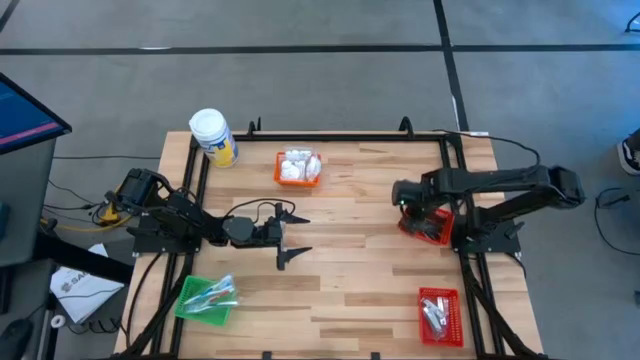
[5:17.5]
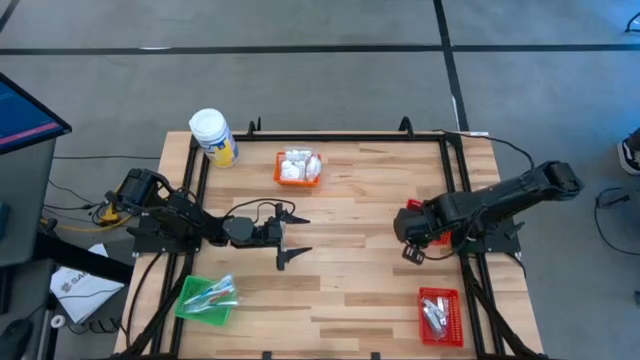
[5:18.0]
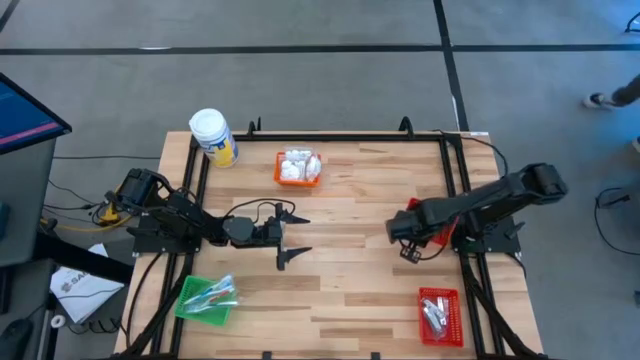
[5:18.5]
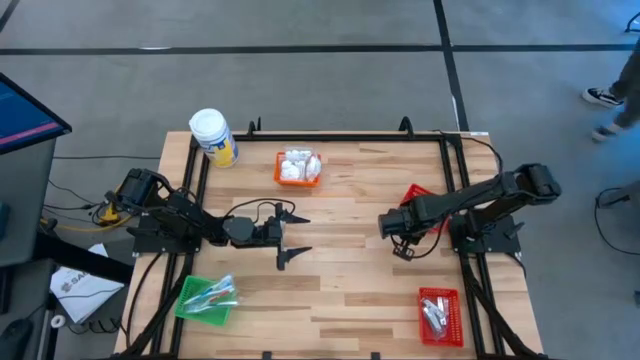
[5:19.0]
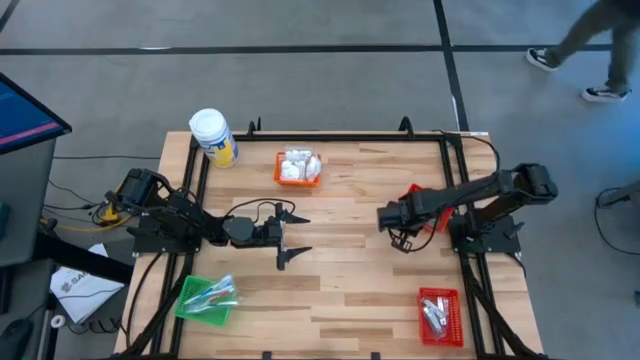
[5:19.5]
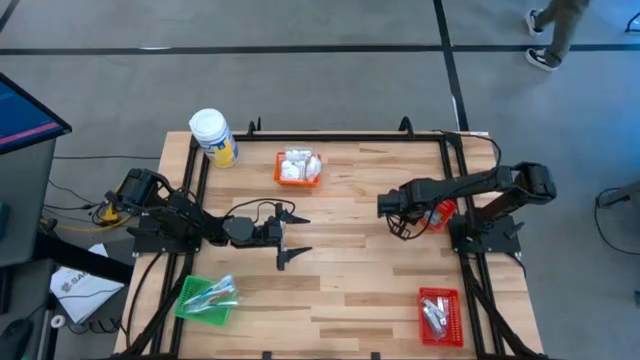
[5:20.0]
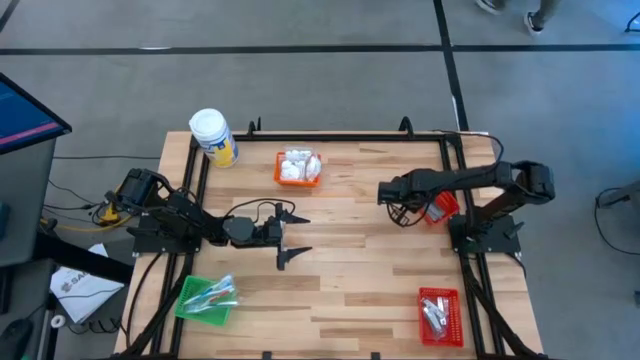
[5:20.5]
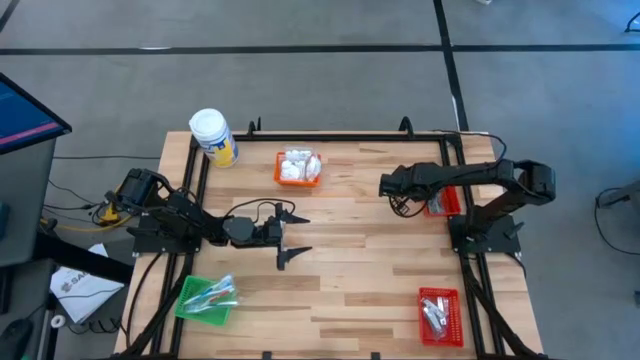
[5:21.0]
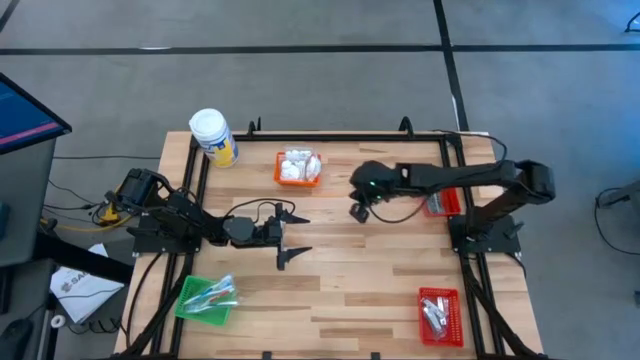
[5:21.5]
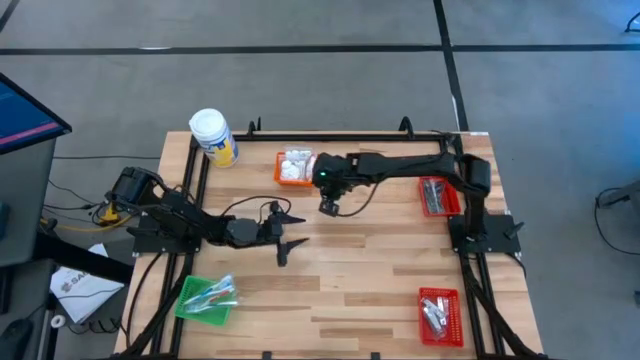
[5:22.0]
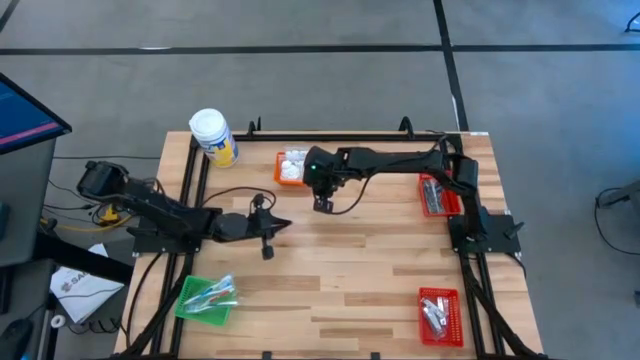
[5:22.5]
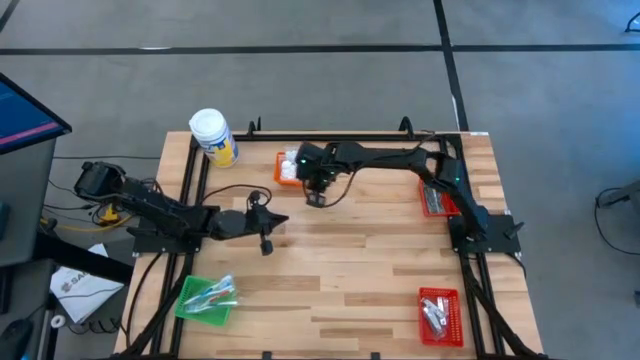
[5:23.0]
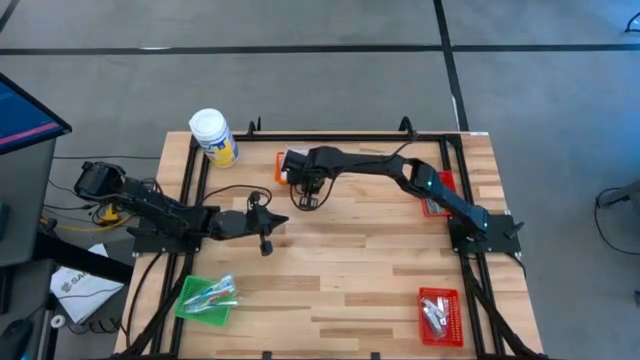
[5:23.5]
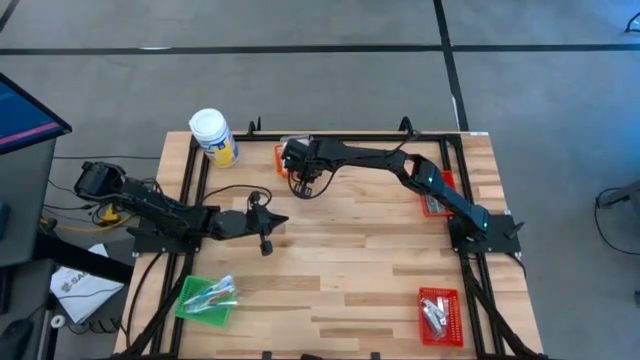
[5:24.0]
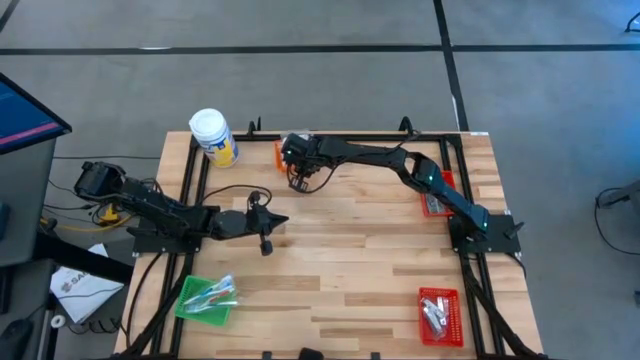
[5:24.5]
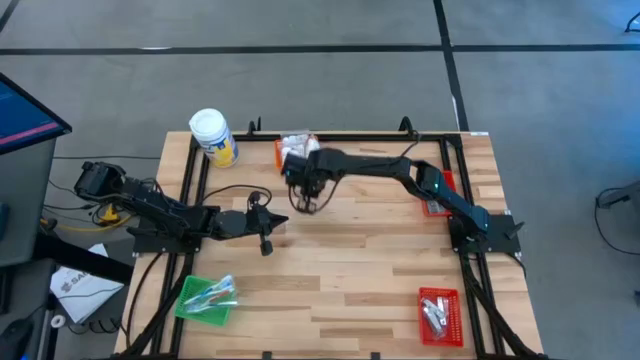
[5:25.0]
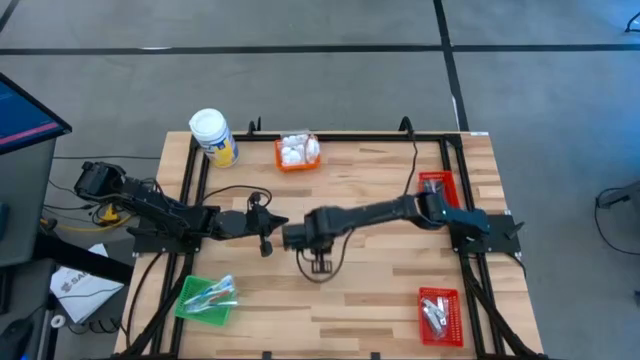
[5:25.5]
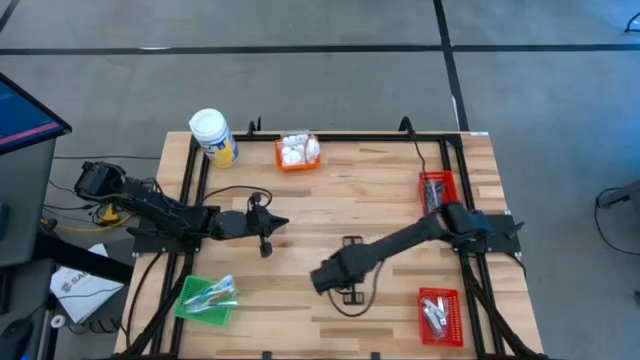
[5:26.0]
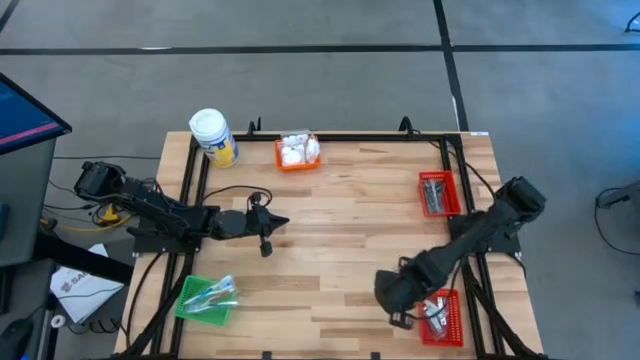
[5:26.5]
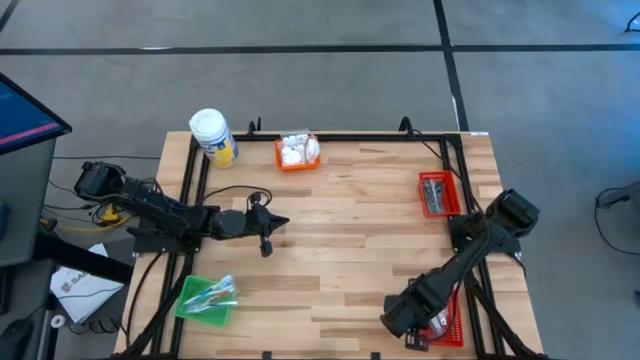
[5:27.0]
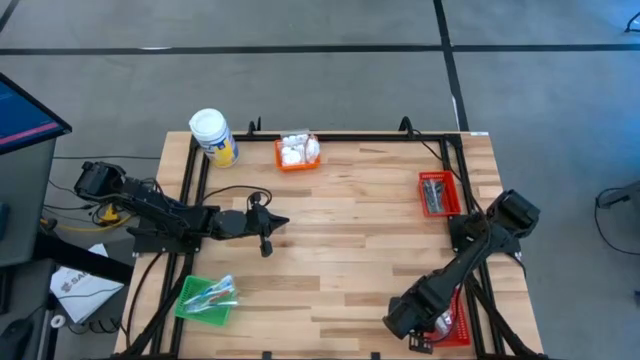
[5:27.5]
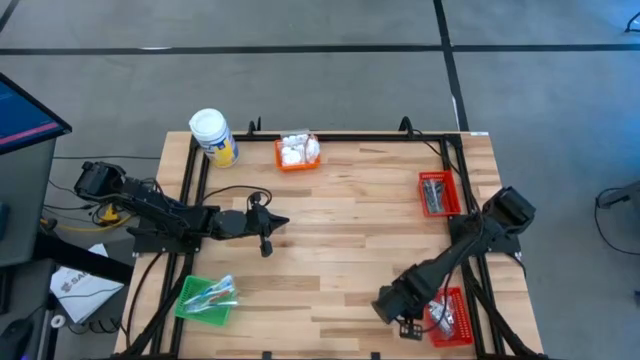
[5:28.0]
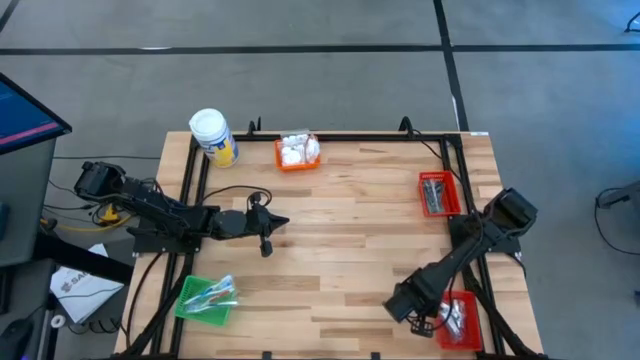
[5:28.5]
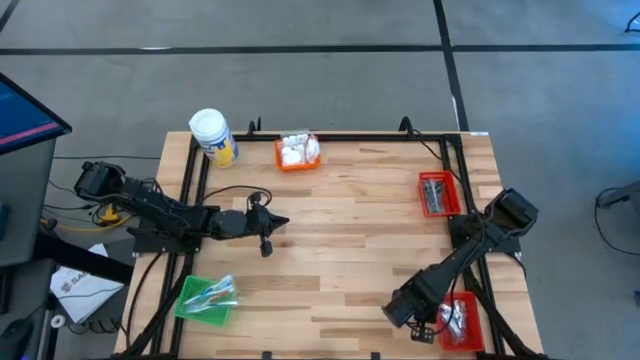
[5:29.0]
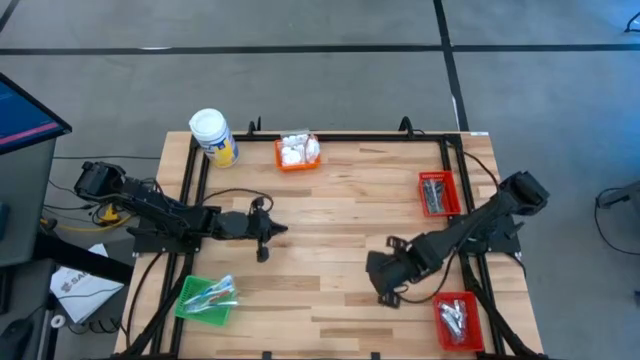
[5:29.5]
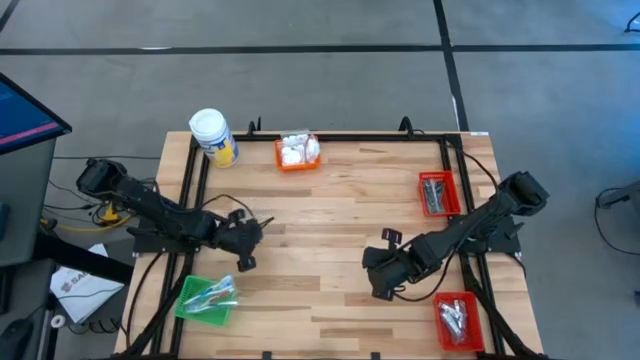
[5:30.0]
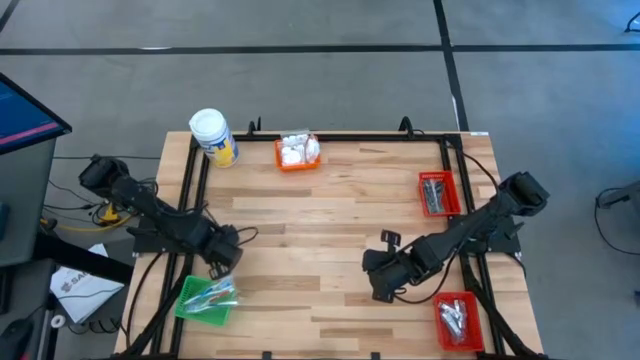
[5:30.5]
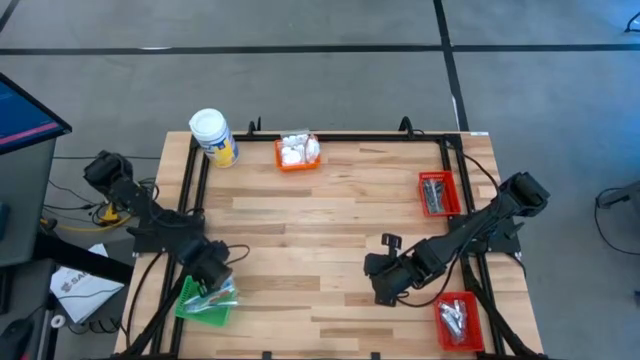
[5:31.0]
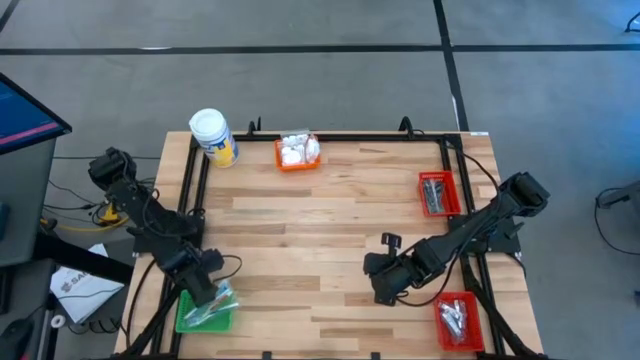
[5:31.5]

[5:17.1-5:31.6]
Task: Pick & Place Travel size toiletries
Adjust the baskets

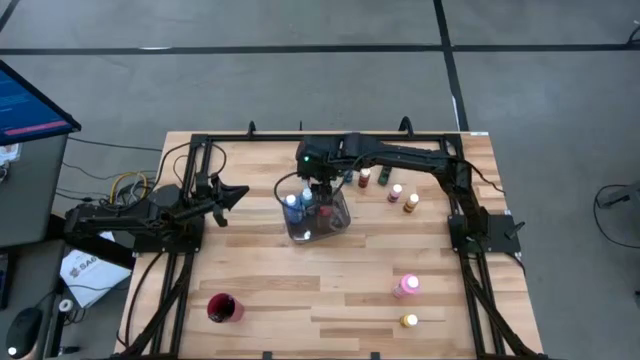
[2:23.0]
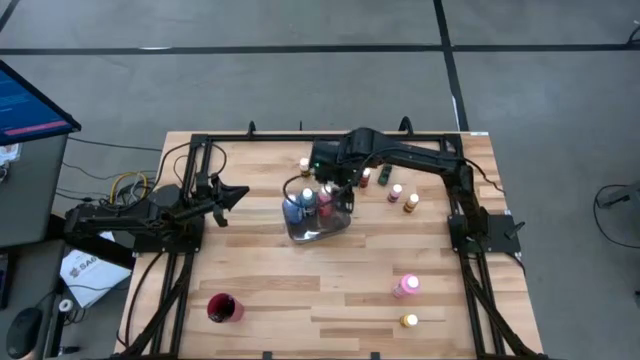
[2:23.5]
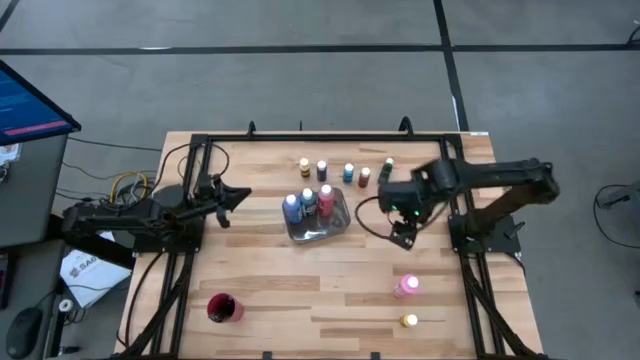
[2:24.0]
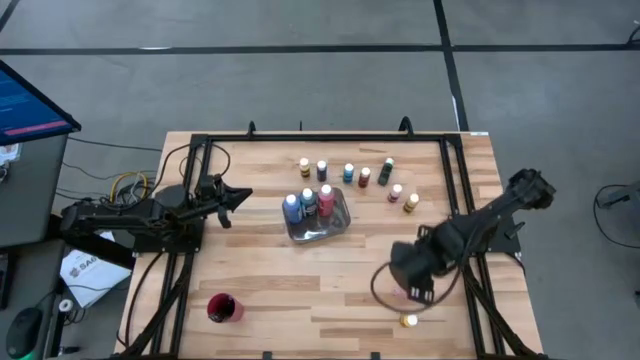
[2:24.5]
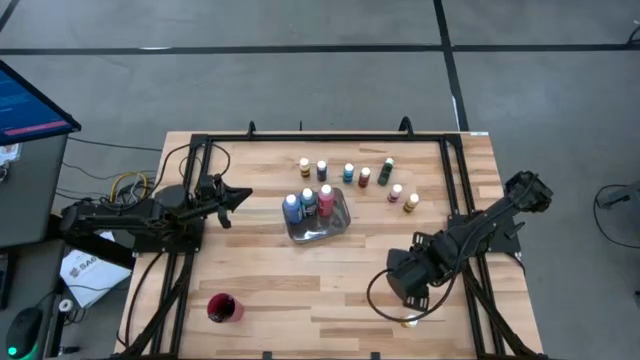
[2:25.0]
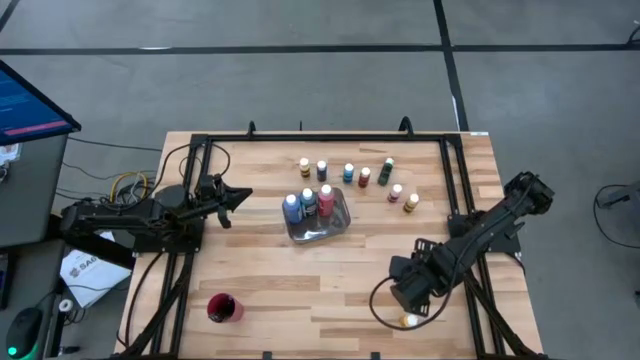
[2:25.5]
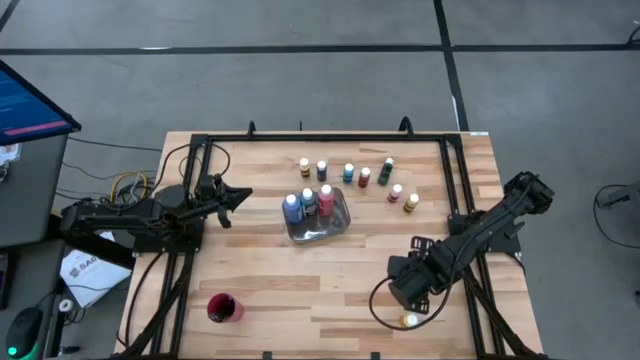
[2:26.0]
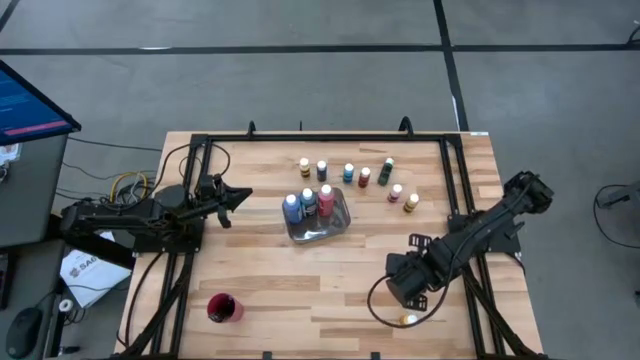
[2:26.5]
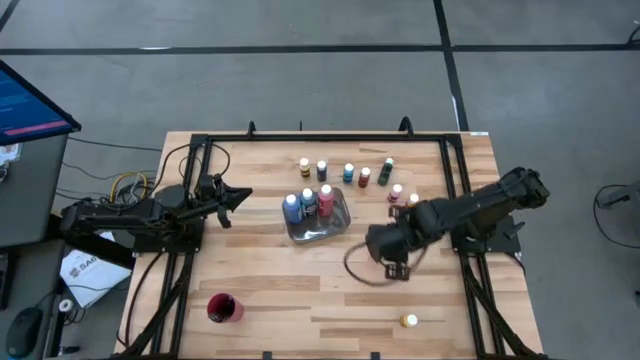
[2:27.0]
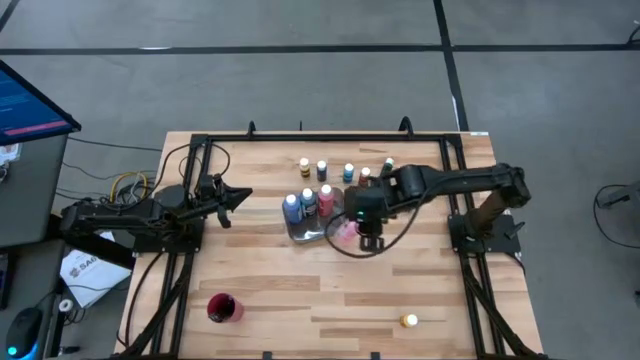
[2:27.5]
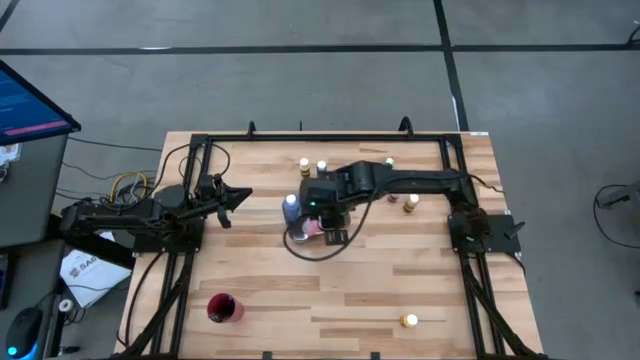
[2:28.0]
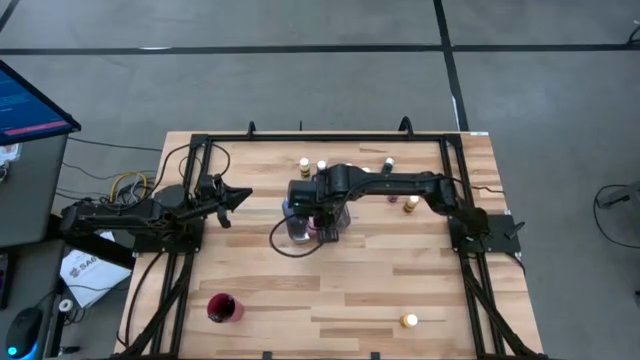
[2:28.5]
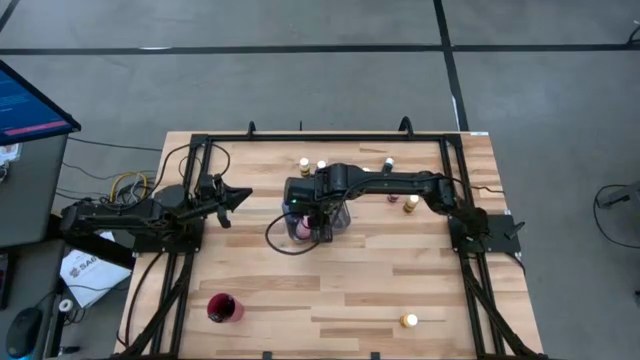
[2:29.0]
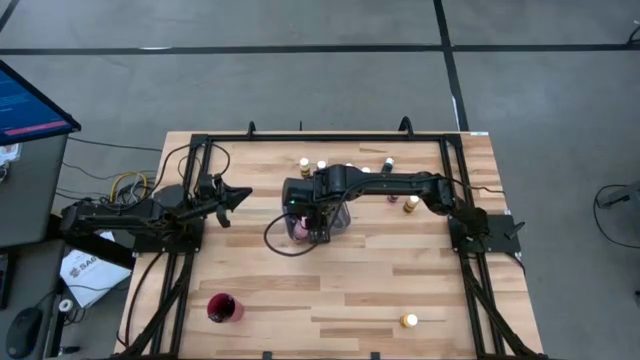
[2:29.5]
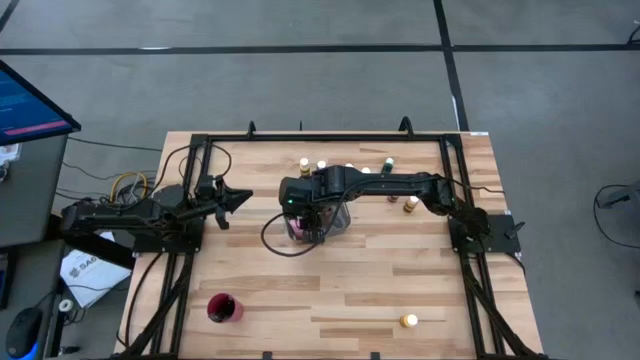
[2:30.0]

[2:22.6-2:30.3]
Task: Pick & Place Paint Supplies
Put the large light pink paint bottle into the black bin
